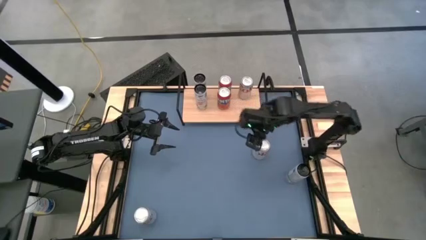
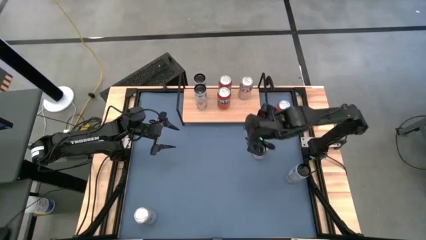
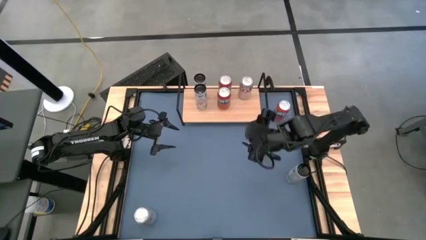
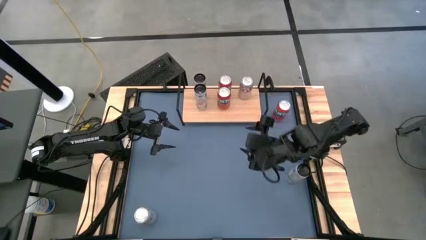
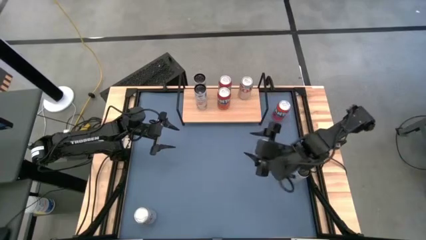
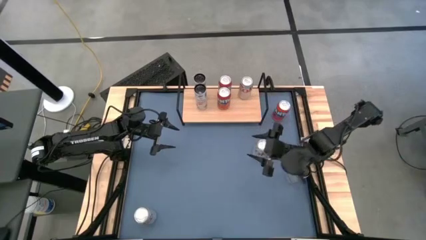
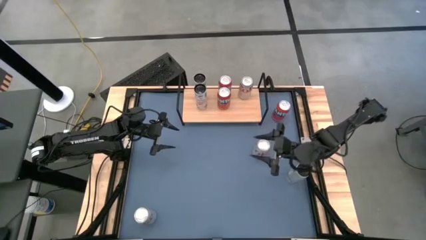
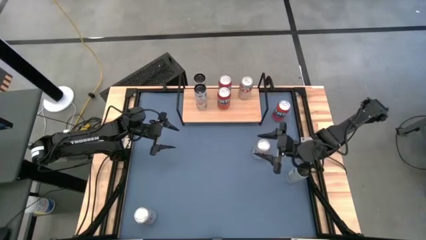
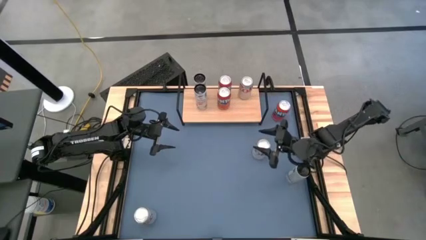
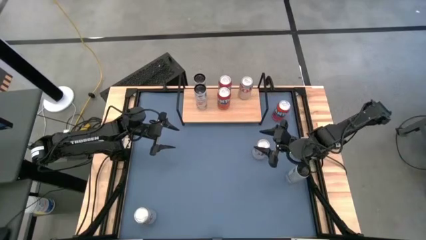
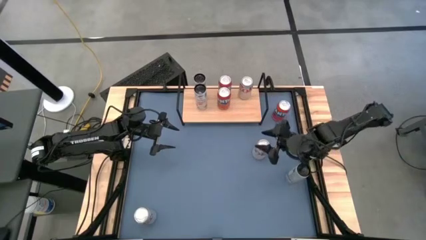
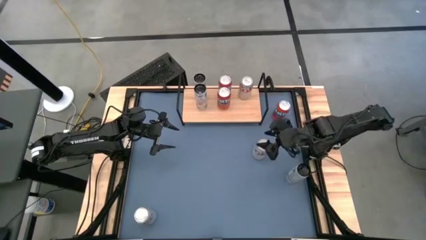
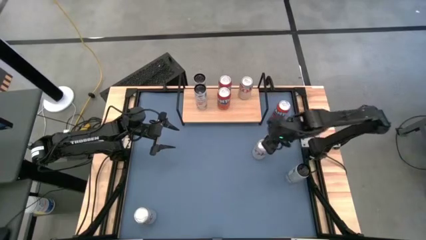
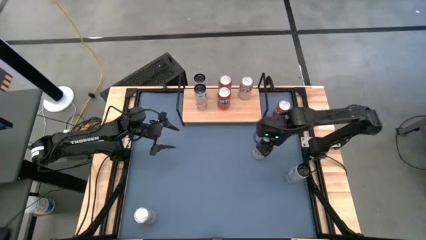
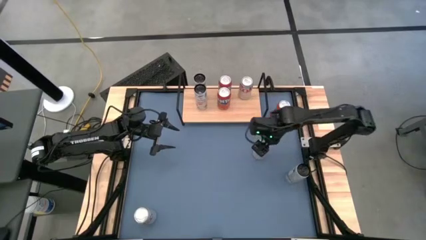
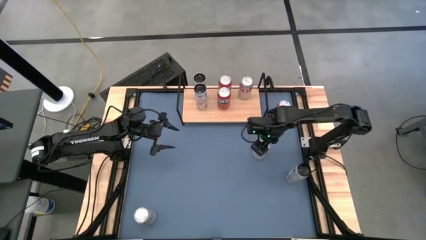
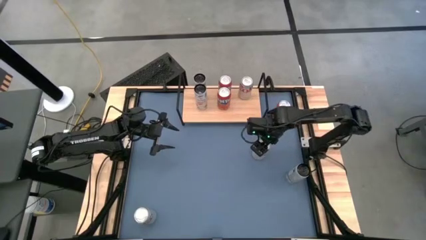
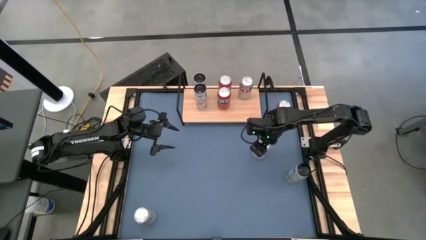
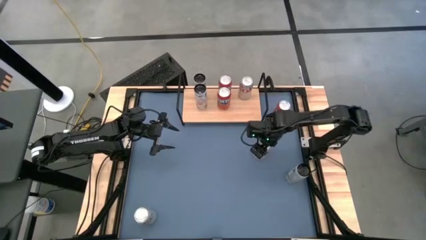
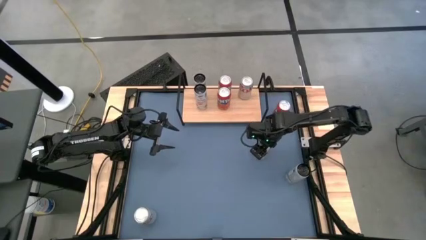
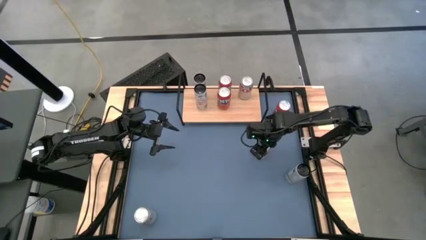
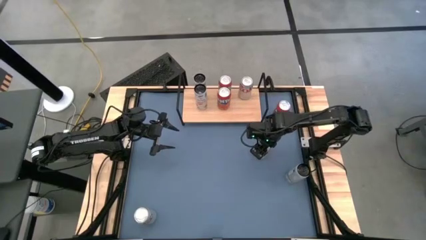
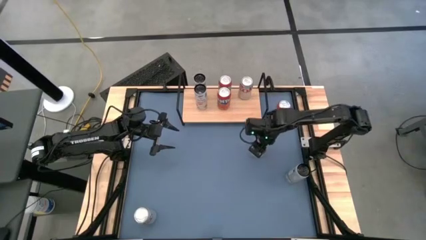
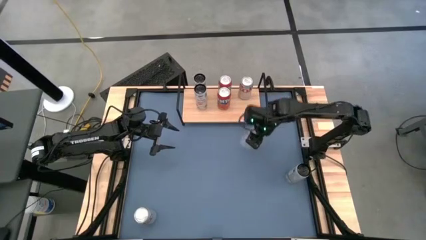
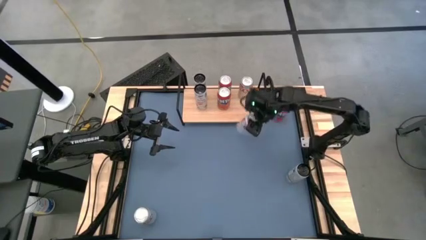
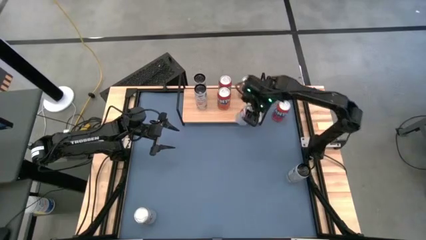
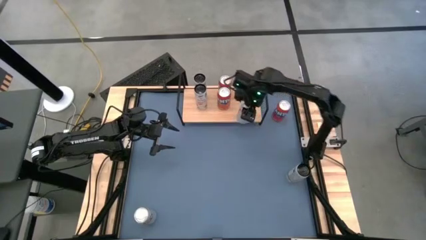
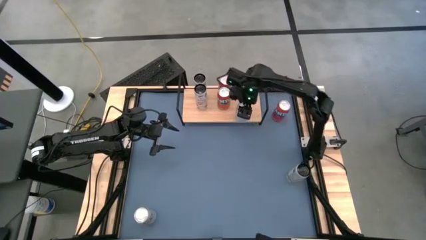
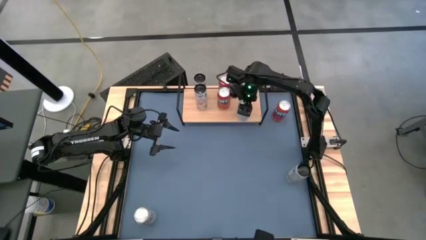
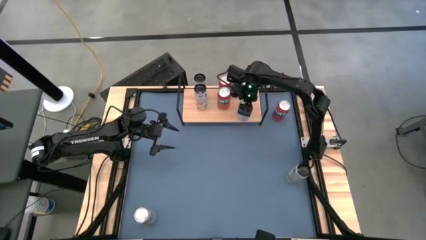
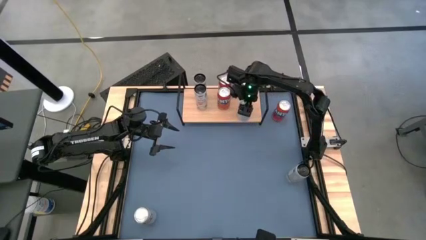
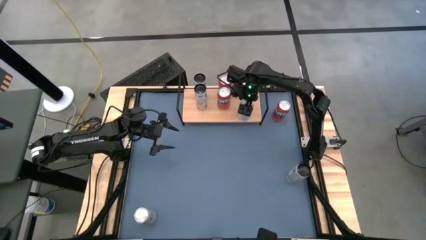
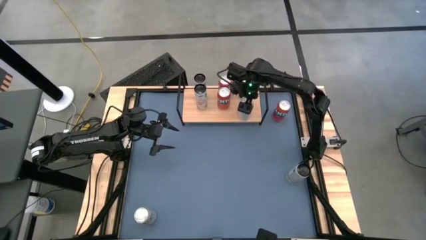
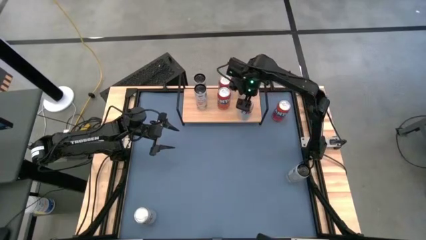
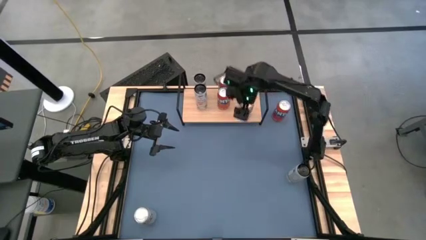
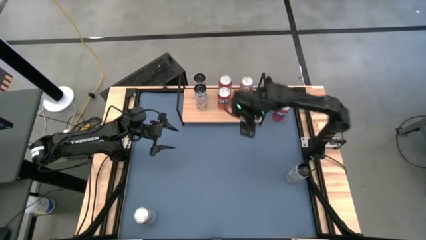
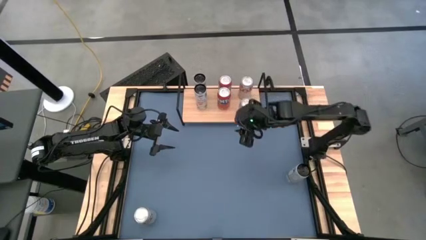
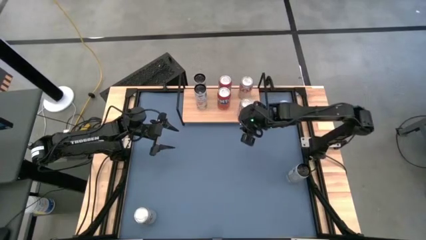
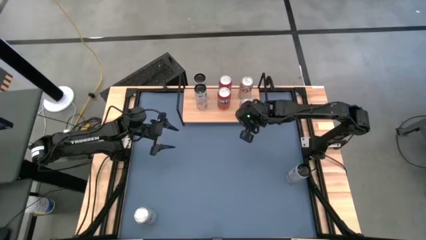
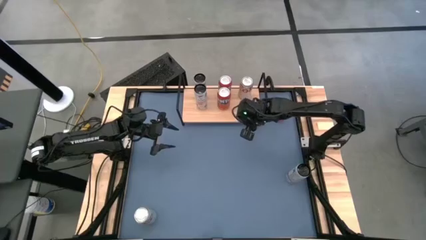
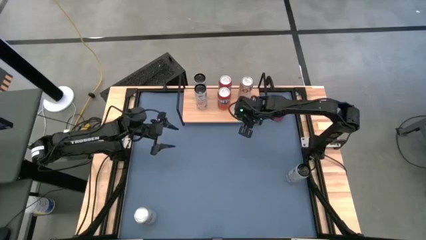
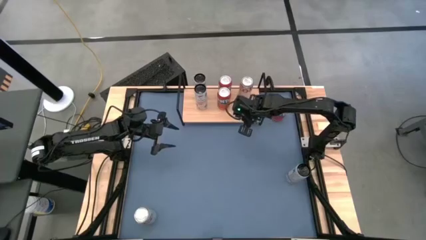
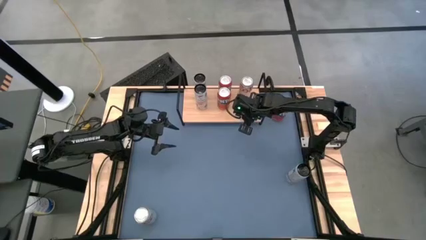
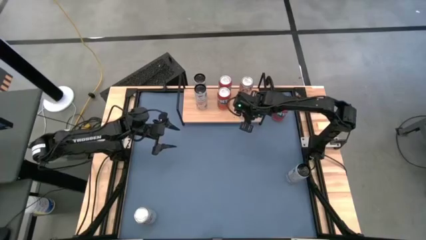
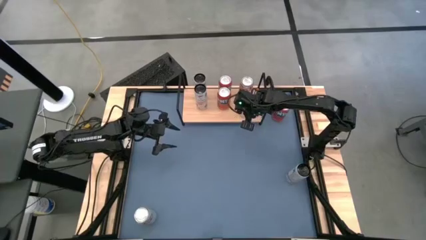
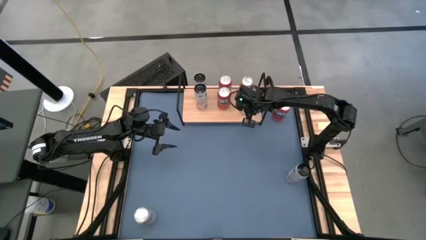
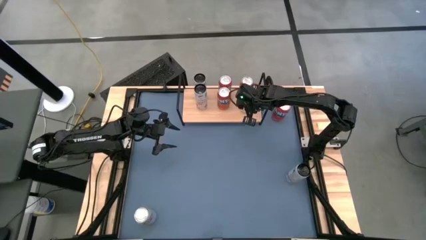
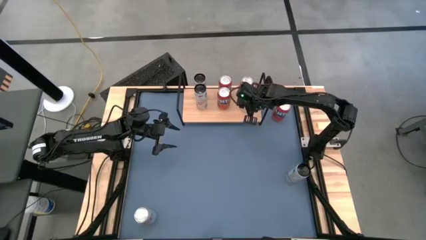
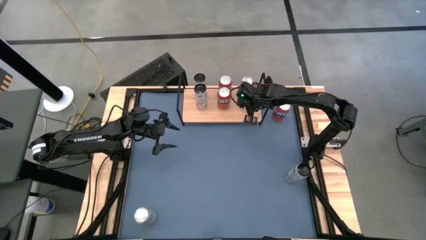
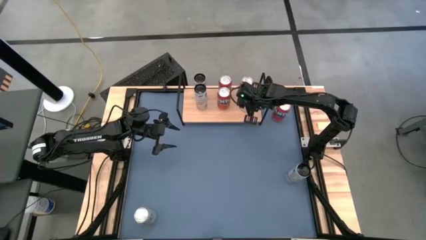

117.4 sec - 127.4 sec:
Task: Place canned beverage on shelf
Put the right silver soda can on the shelf aligned with the other silver soda can

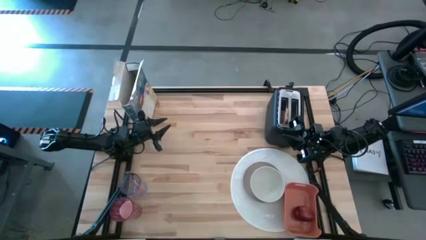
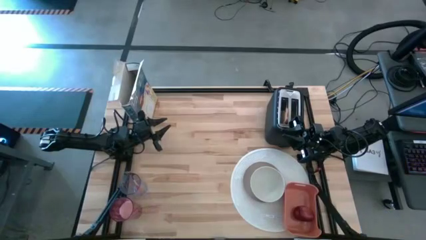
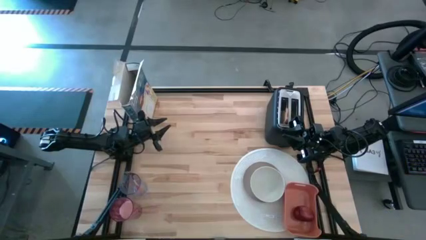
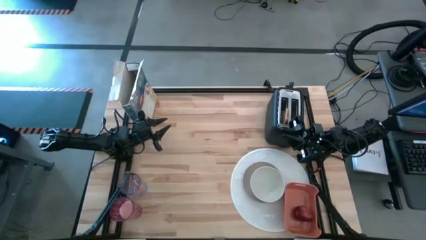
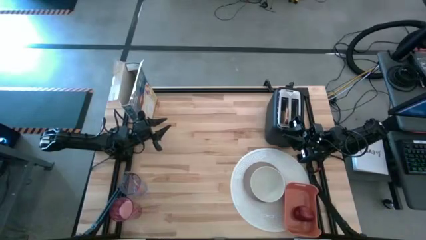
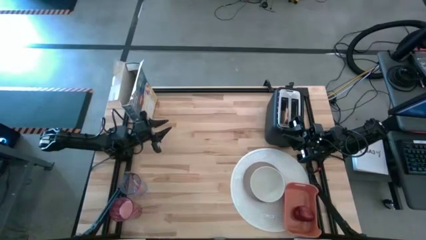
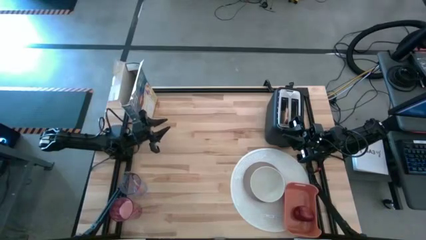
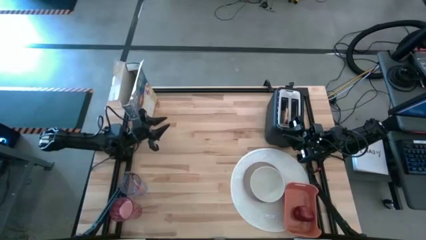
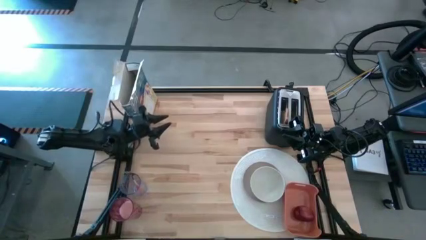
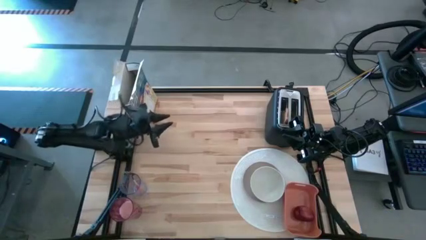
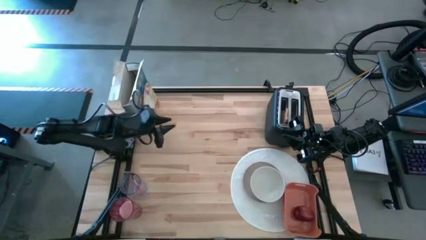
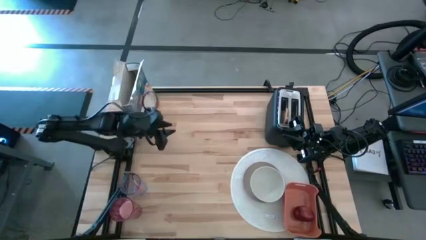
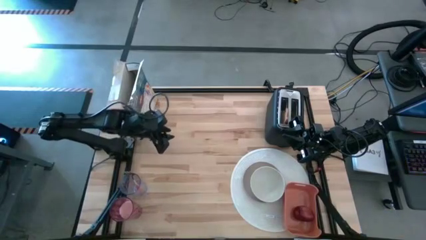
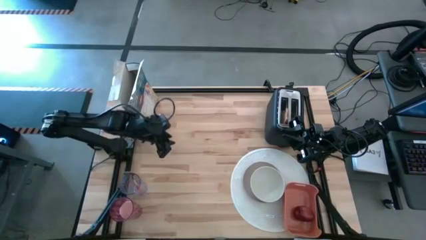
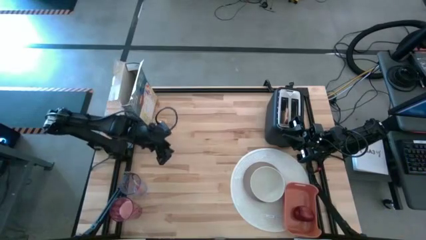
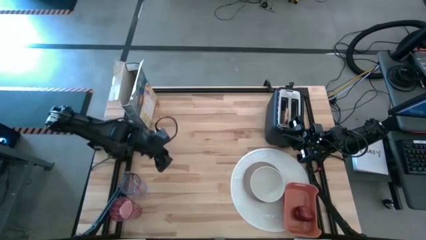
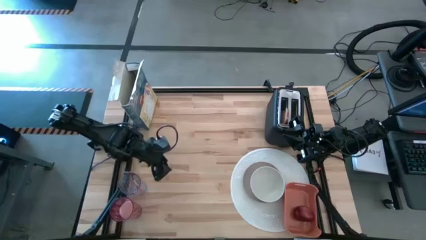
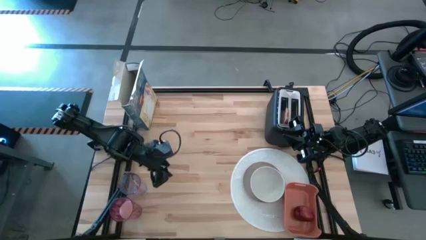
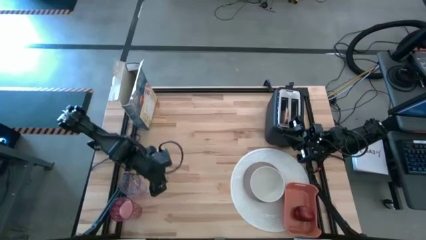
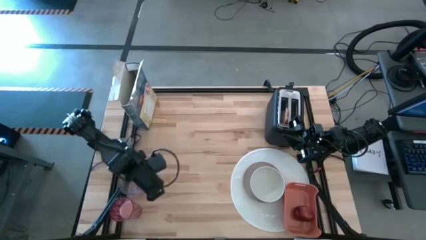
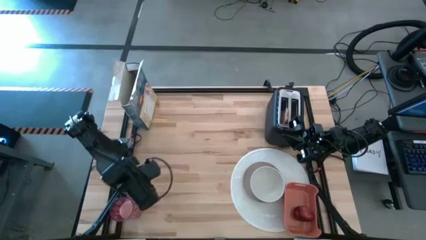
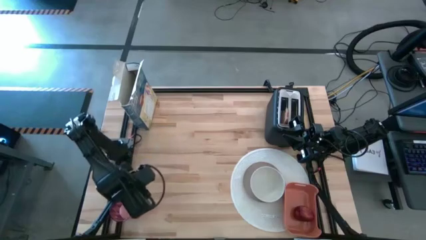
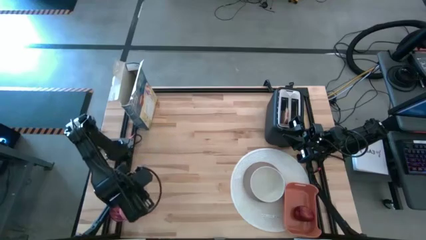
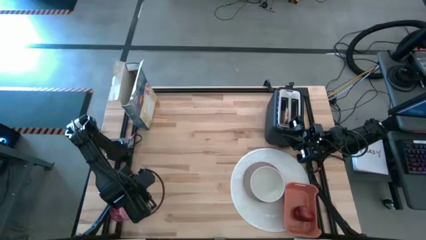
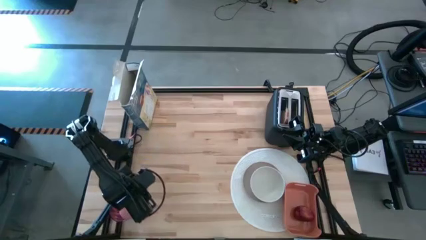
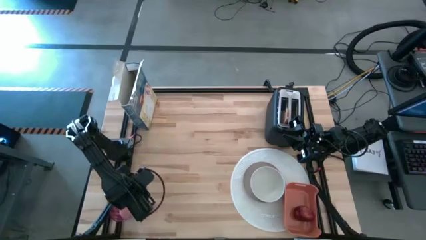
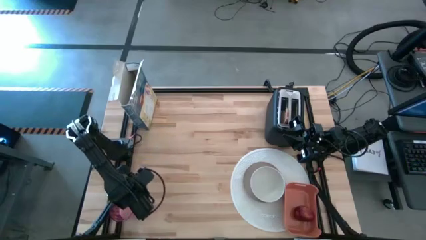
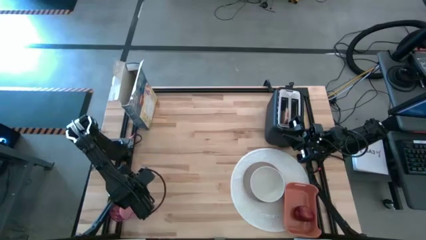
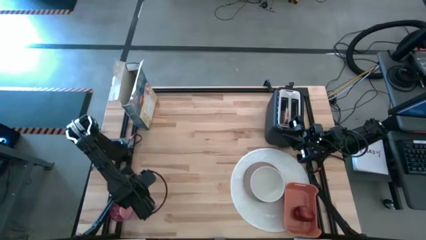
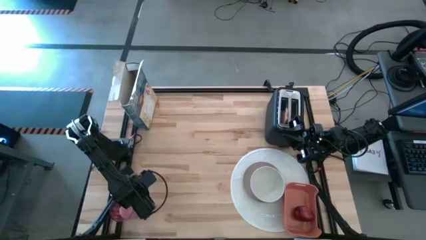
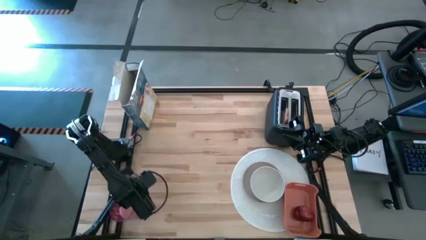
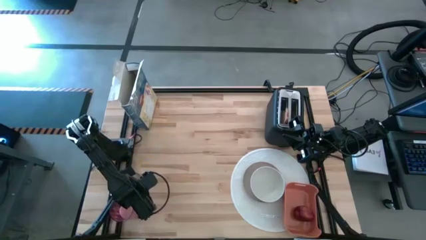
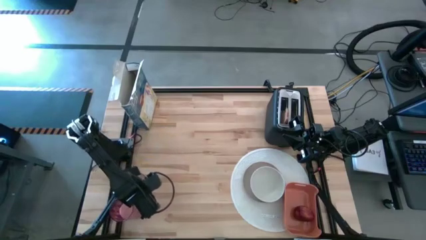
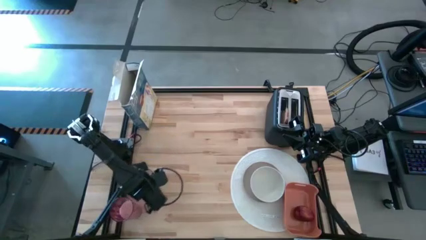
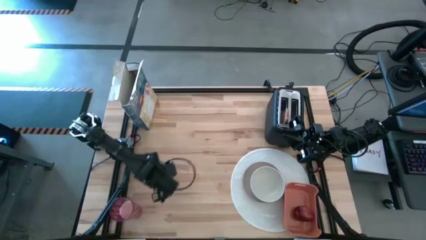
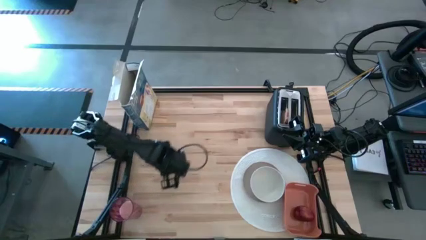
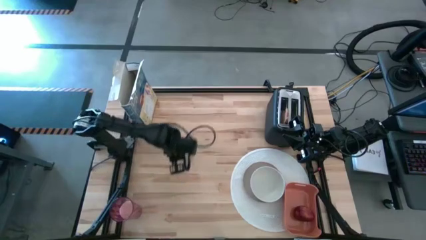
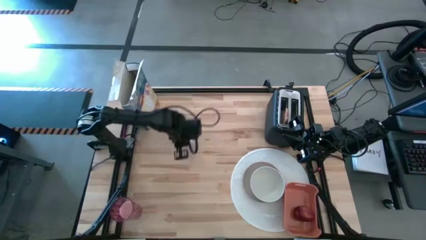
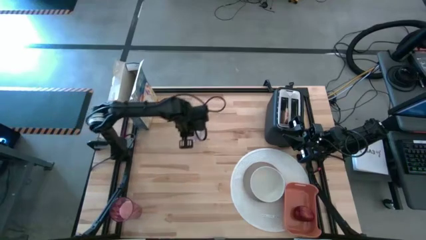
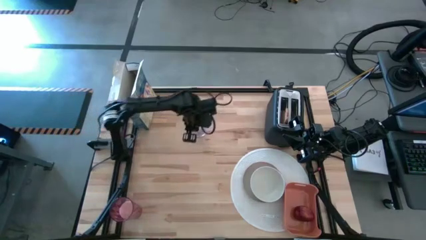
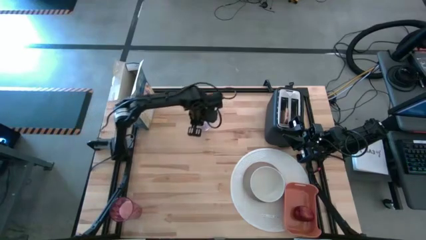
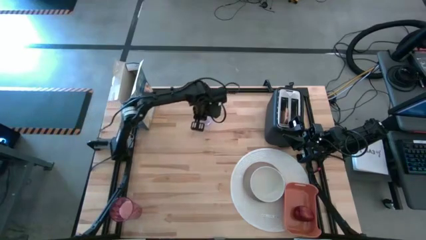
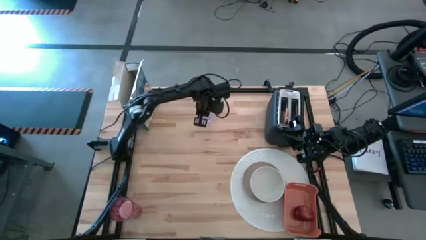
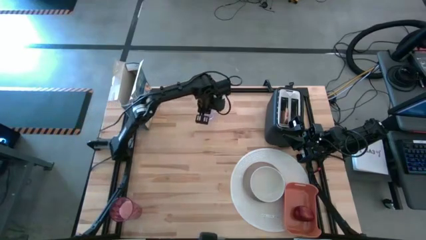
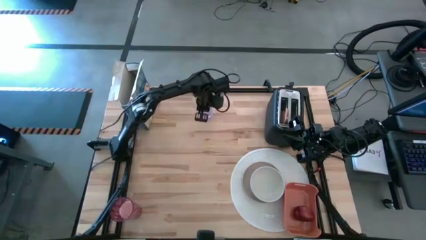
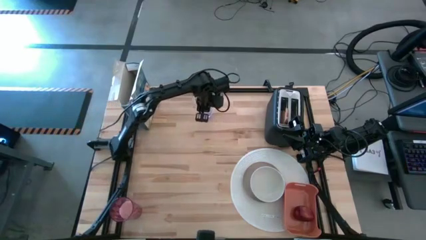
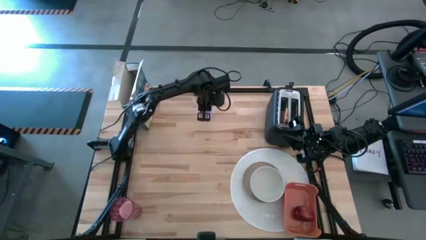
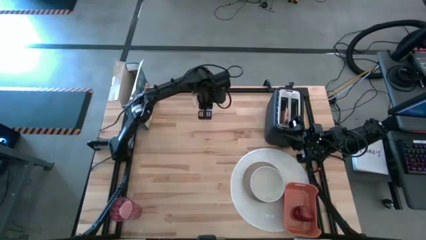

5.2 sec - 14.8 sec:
Task: Arrange a breakfast setting
Move the blue glass with an orange spoon to the top of the table
